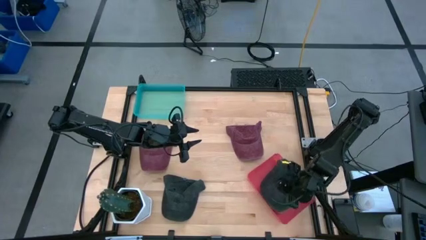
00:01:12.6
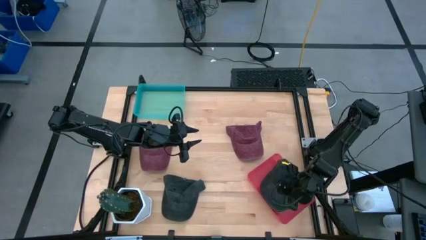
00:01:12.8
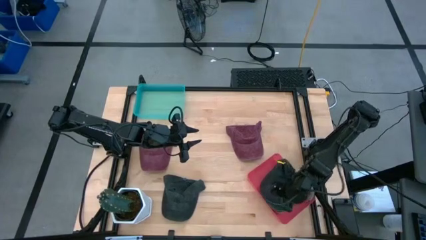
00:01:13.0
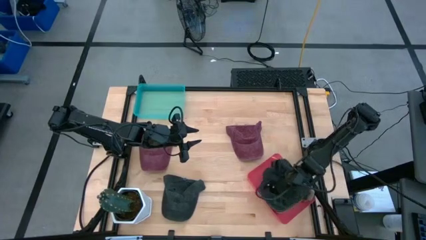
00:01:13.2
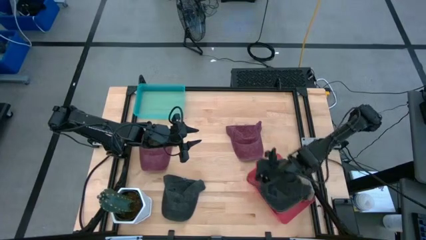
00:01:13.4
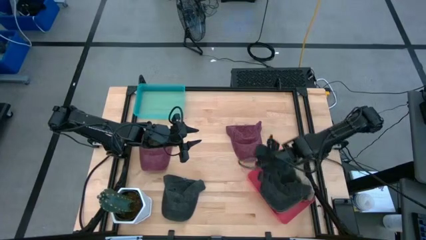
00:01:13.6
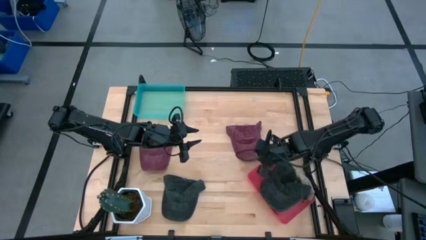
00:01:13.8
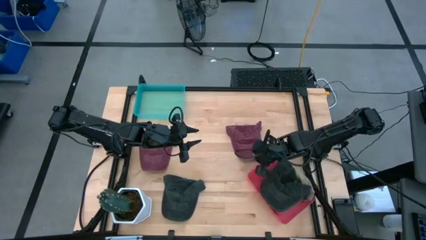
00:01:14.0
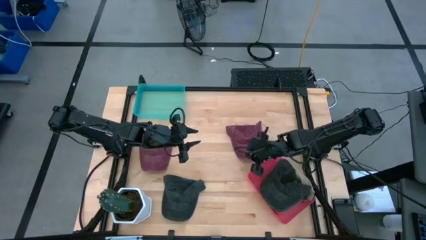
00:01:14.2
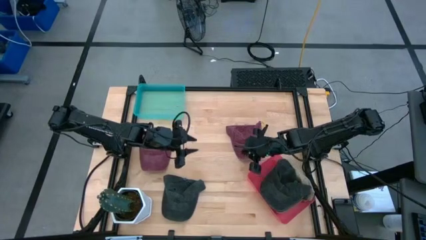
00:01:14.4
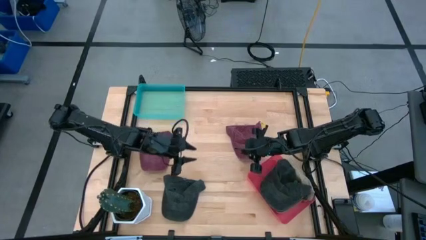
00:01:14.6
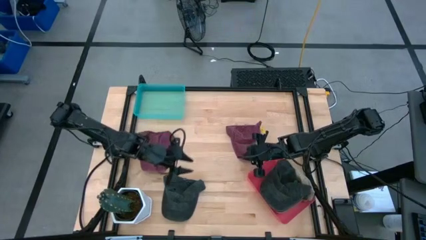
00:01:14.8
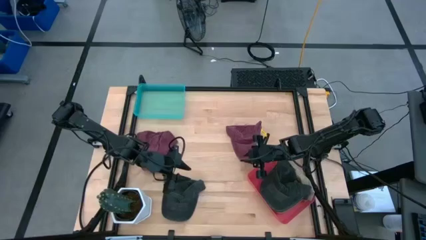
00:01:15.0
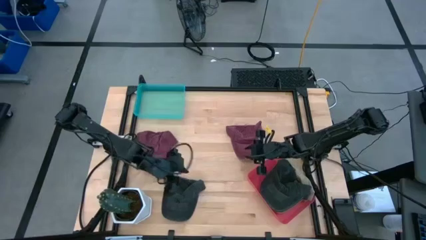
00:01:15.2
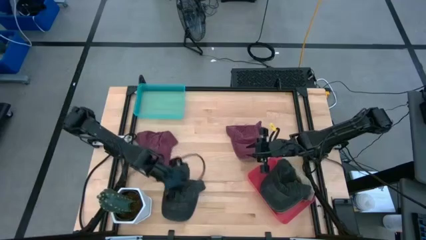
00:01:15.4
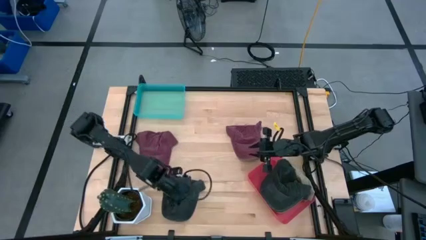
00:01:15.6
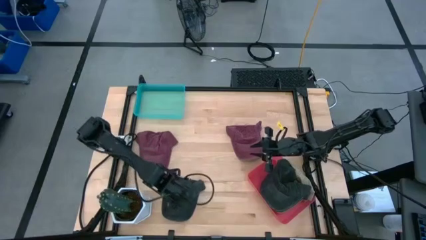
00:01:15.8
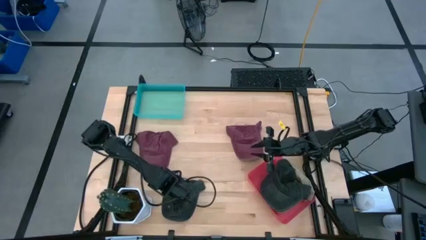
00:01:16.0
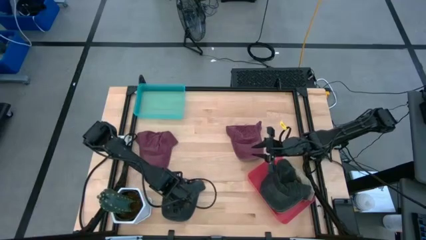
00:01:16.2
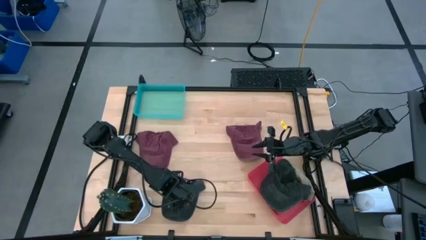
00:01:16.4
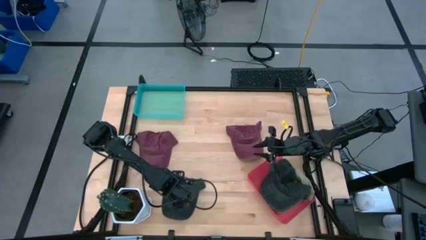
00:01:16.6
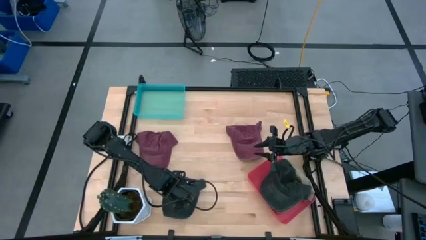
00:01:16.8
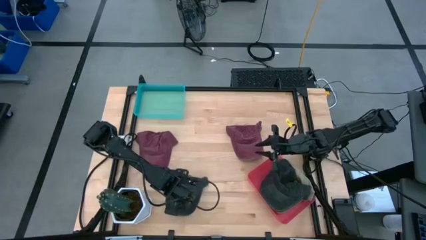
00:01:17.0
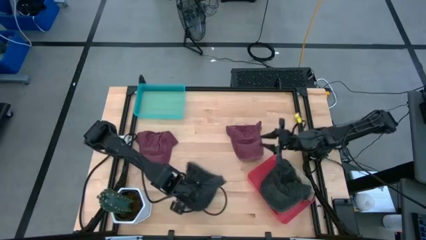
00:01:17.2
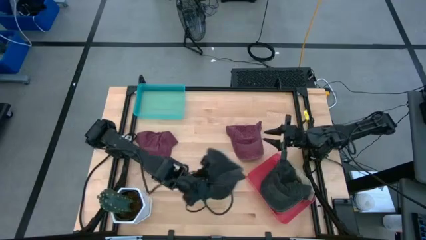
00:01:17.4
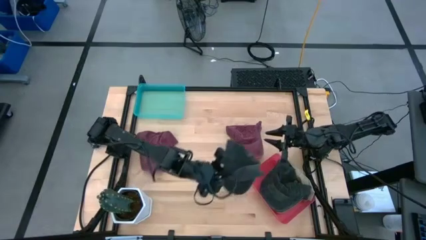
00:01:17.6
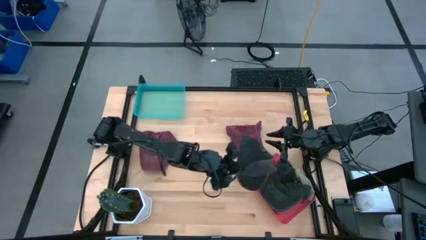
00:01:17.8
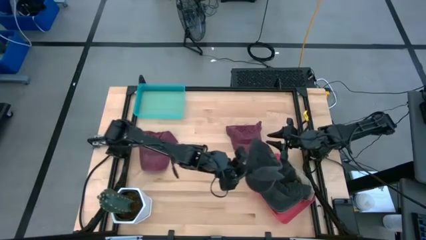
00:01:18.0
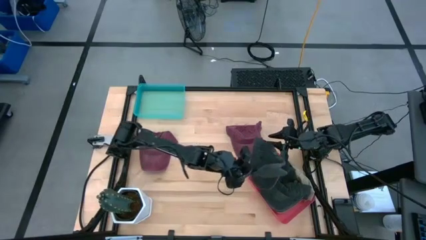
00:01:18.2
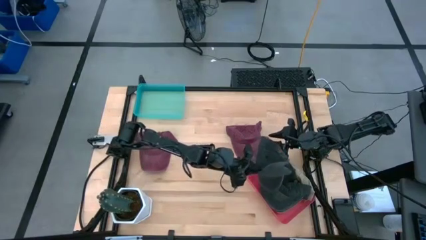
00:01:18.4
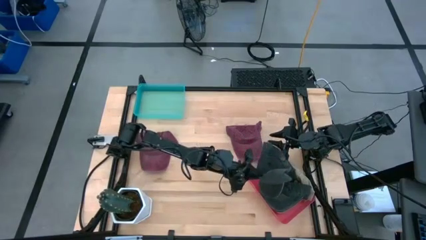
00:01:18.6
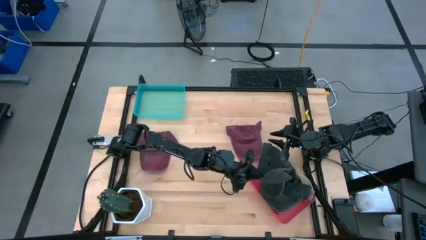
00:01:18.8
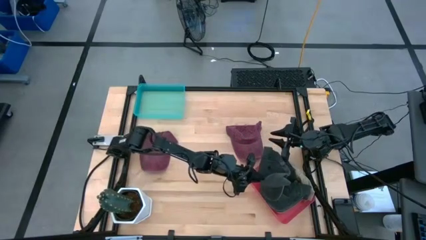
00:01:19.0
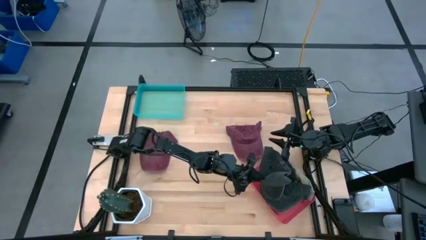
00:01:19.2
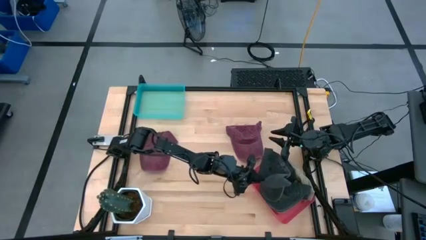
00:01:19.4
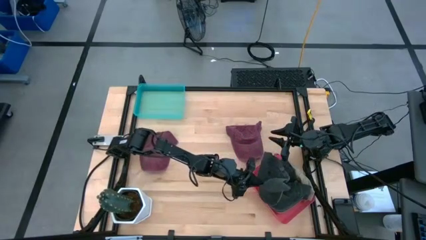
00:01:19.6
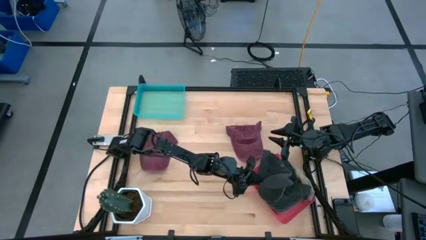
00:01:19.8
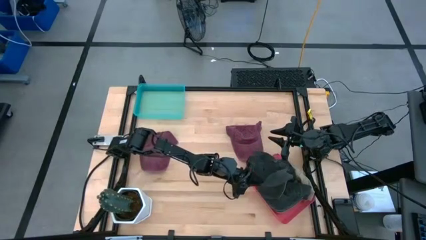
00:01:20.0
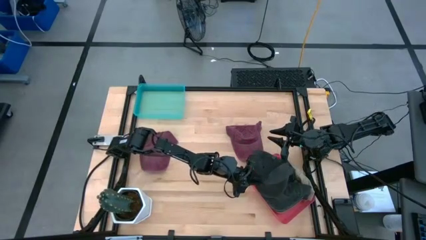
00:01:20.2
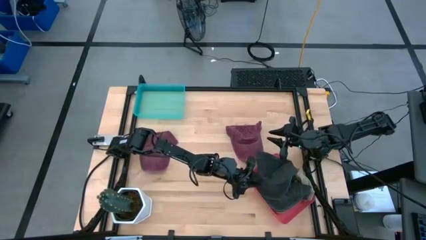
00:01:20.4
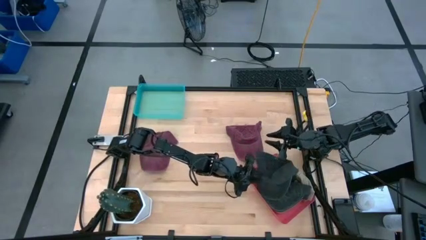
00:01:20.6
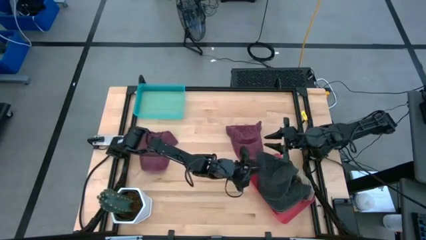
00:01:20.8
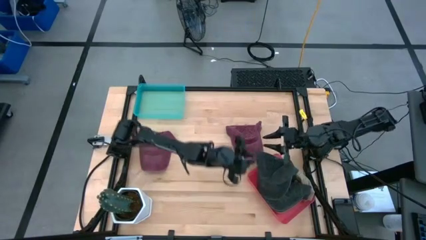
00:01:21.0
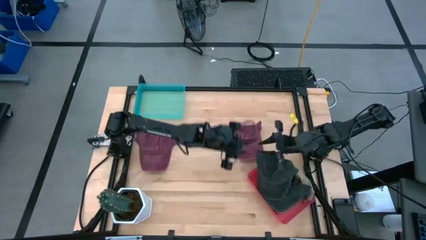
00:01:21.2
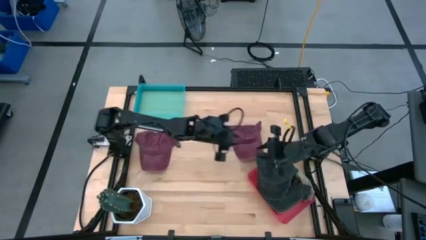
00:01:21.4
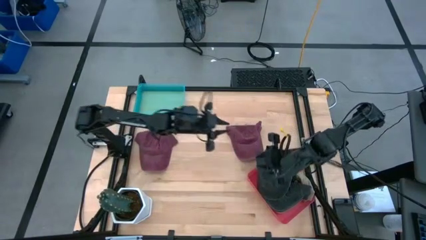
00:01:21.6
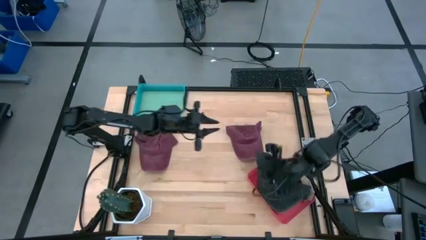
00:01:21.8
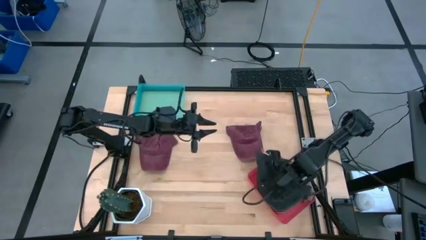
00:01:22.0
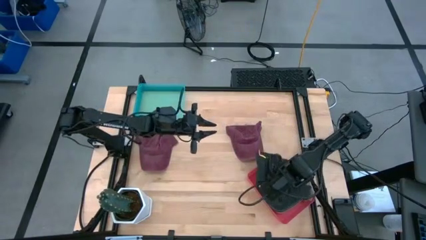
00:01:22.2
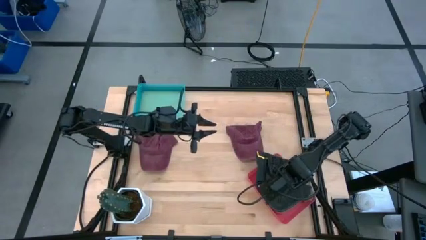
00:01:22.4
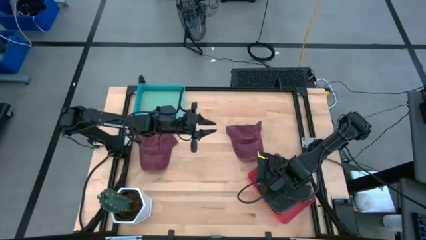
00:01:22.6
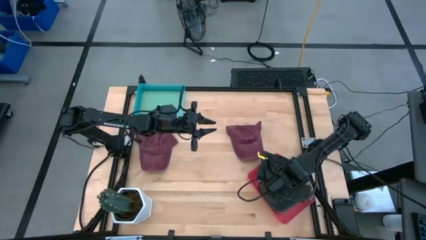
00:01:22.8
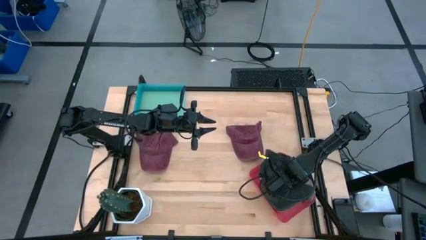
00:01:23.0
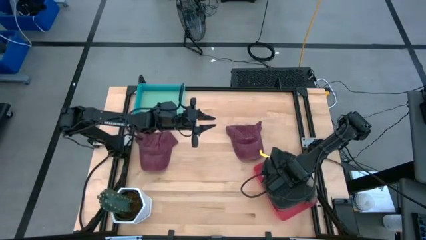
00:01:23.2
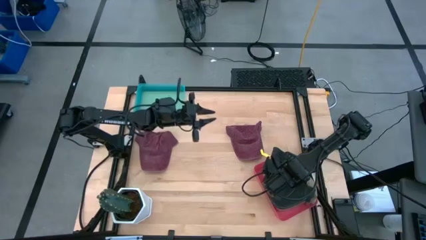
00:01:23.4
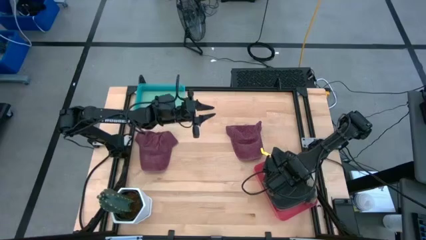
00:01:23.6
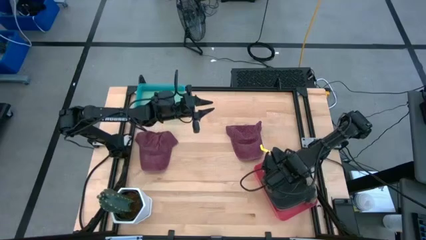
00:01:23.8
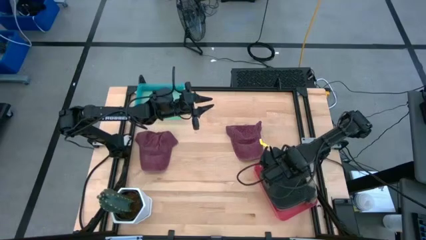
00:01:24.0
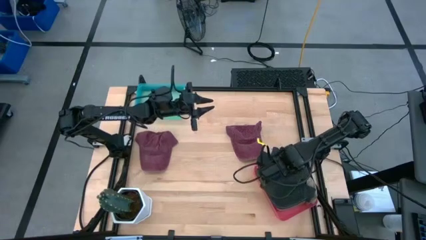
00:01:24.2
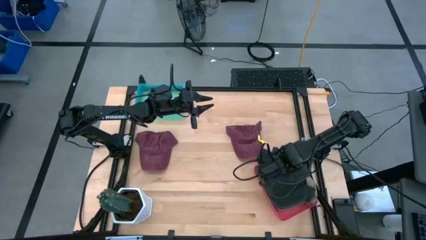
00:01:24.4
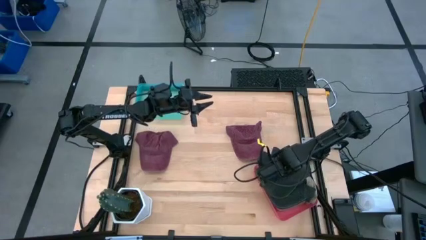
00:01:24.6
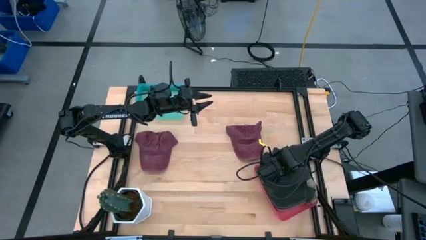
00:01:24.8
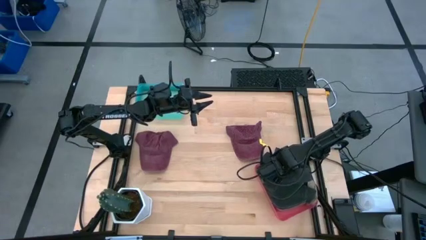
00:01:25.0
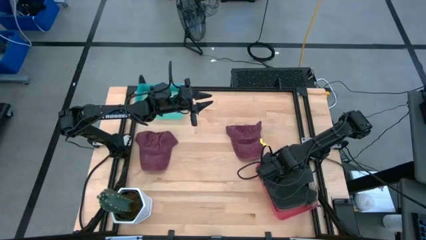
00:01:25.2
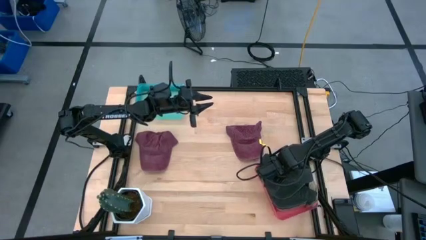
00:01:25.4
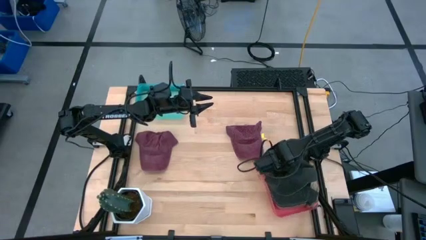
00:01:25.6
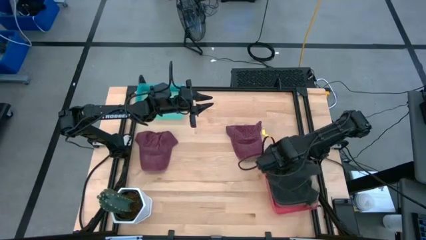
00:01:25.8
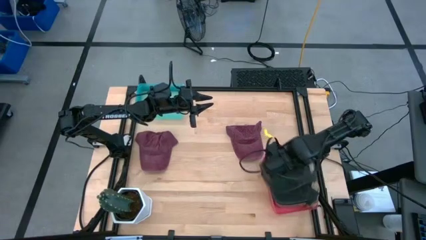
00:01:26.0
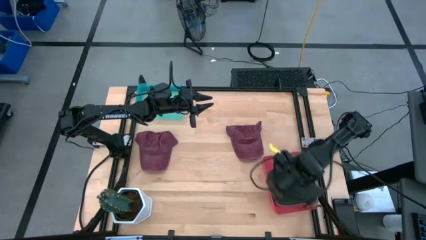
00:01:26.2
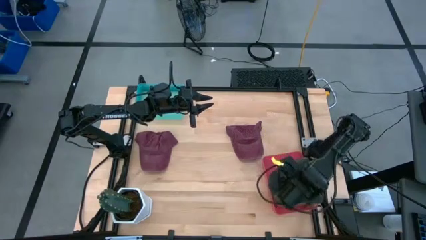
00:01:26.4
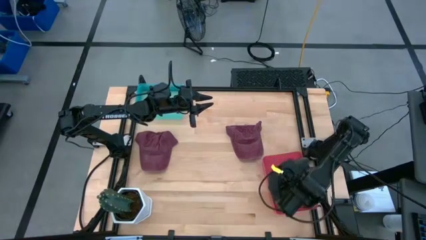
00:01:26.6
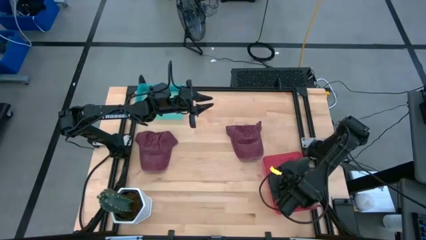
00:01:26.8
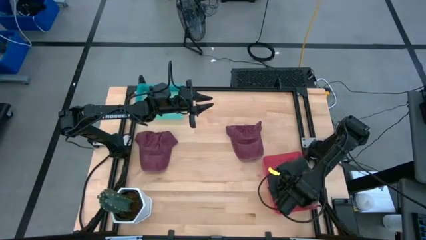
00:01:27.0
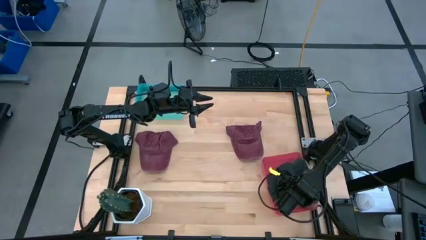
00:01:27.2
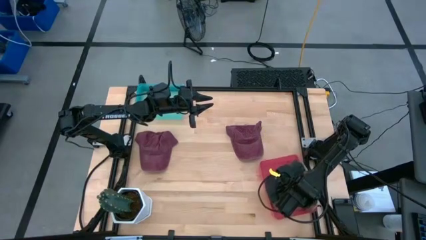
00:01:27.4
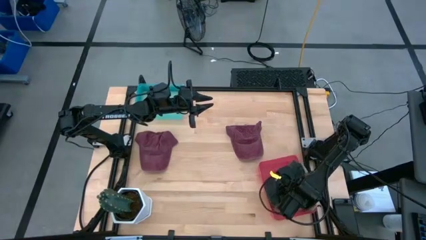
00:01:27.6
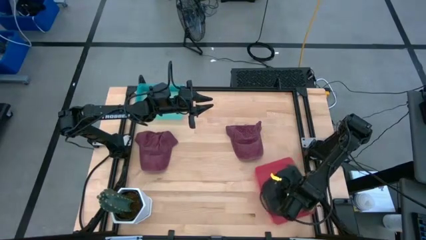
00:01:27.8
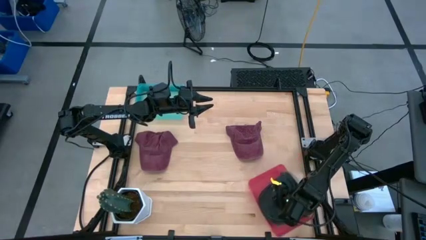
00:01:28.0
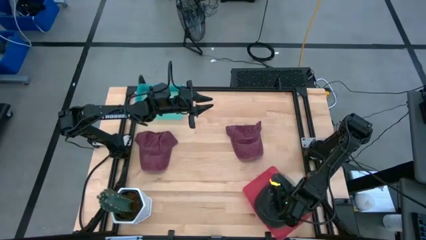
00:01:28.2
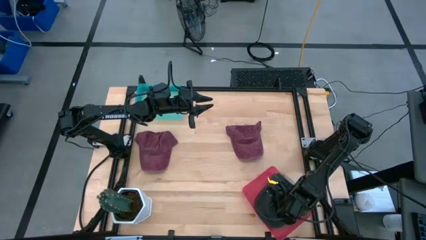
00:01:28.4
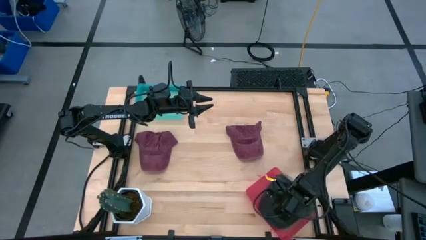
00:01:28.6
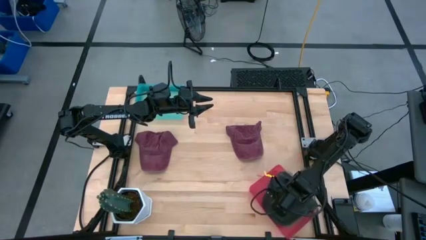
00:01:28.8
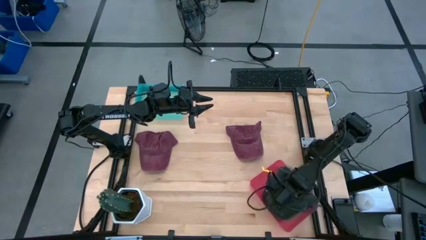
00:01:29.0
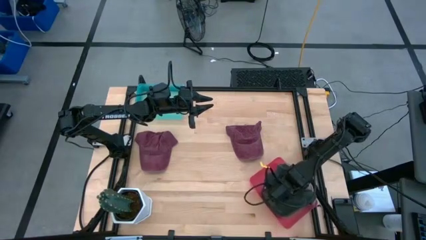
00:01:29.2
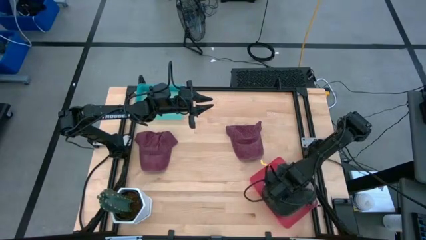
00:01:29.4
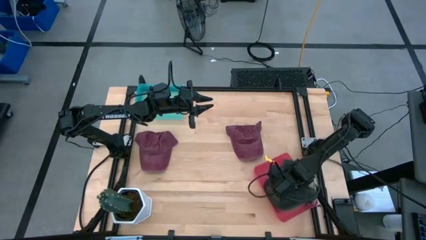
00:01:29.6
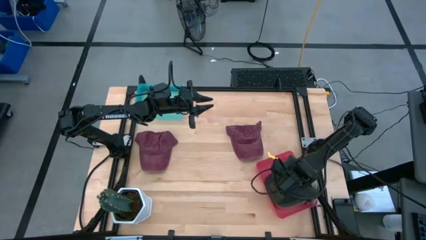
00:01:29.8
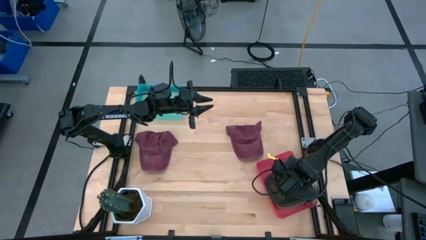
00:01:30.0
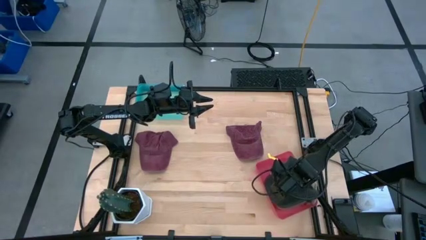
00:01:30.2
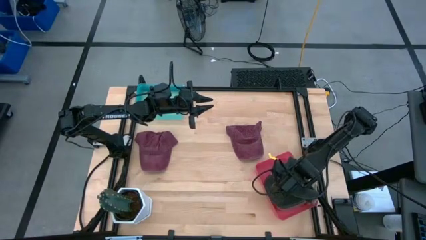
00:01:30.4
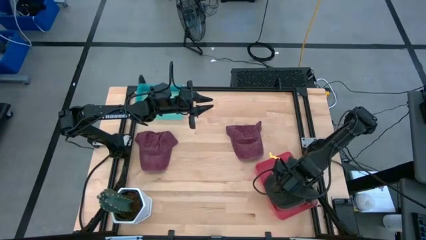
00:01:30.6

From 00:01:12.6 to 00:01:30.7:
Task: Pick & Place hat
Put the black cap into the pink bin
